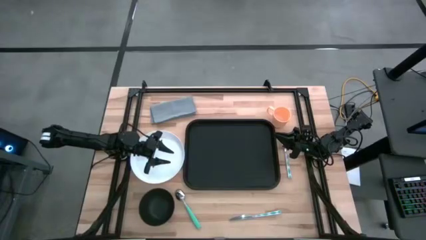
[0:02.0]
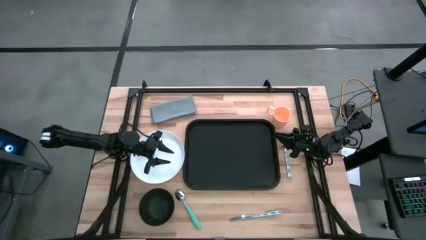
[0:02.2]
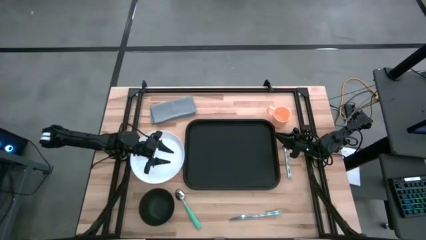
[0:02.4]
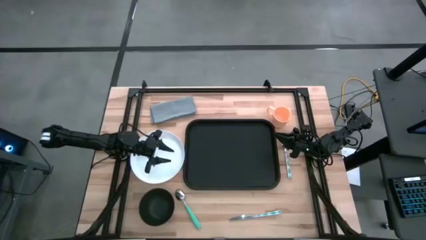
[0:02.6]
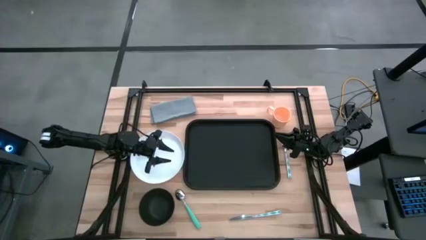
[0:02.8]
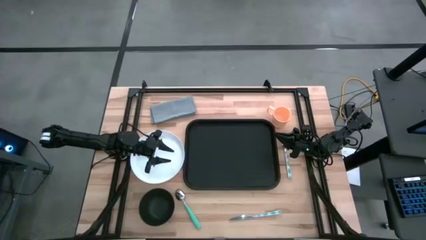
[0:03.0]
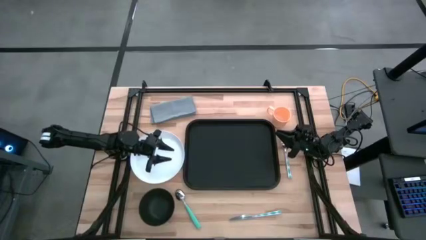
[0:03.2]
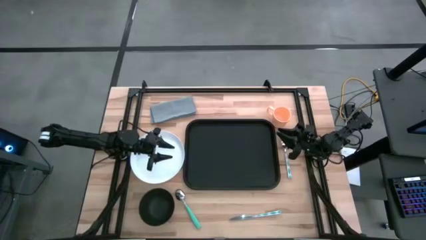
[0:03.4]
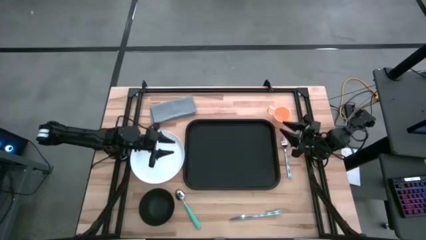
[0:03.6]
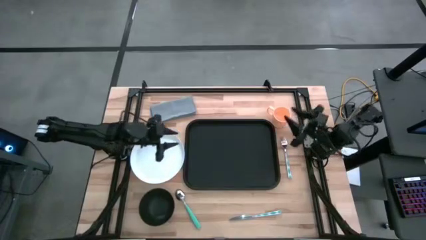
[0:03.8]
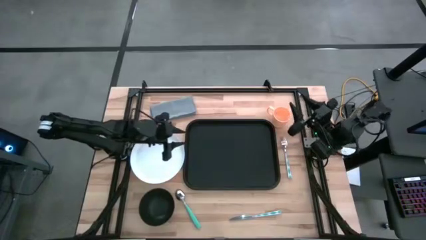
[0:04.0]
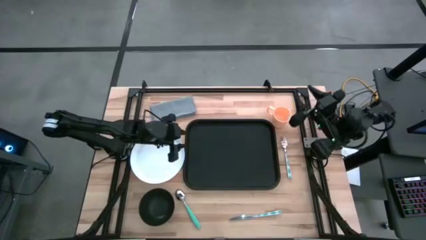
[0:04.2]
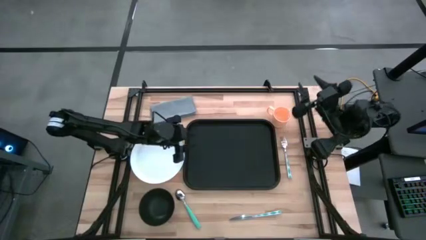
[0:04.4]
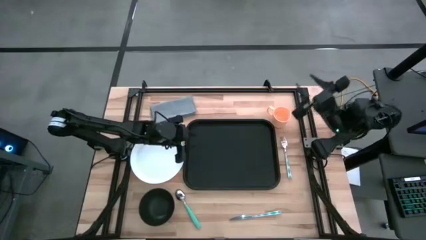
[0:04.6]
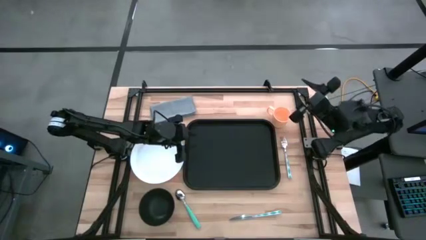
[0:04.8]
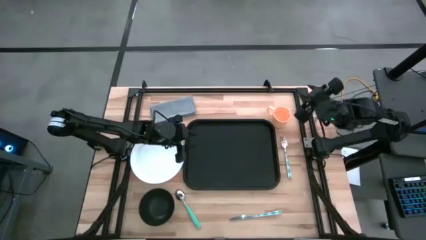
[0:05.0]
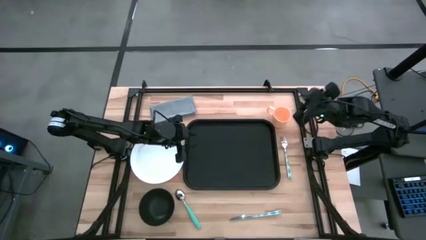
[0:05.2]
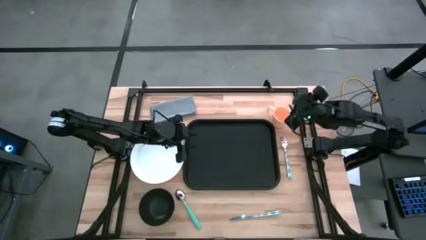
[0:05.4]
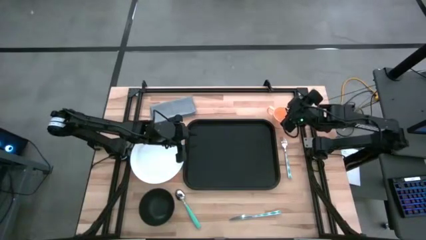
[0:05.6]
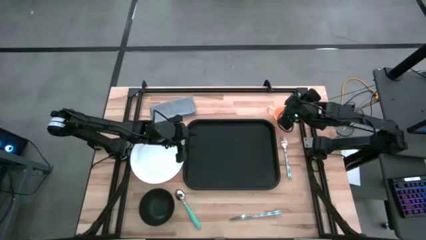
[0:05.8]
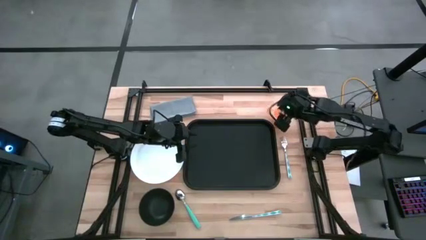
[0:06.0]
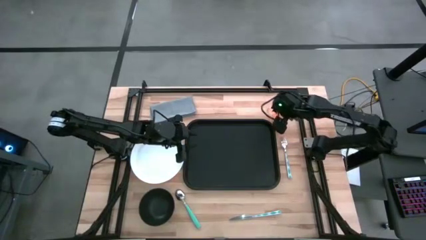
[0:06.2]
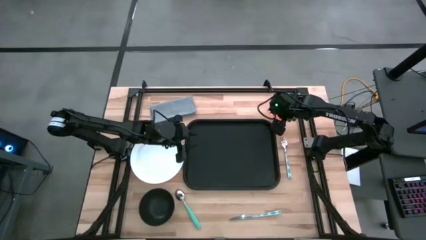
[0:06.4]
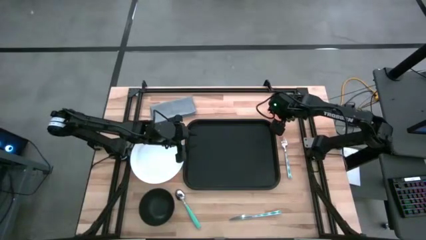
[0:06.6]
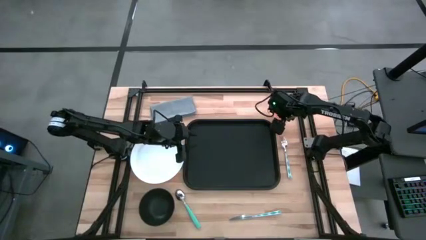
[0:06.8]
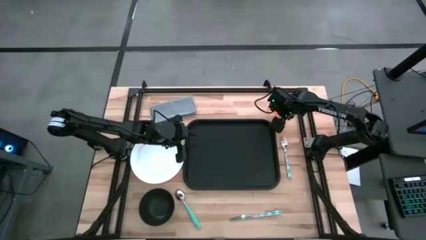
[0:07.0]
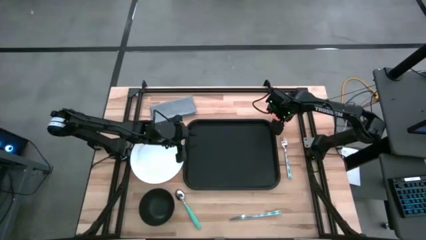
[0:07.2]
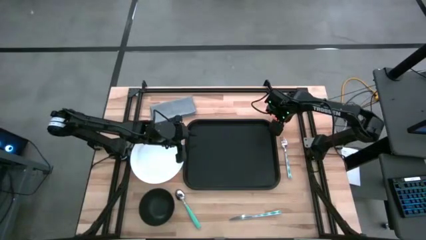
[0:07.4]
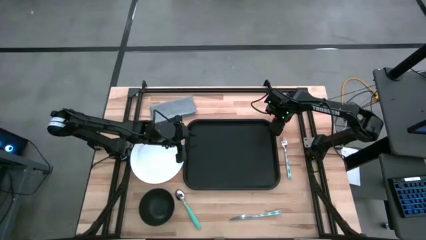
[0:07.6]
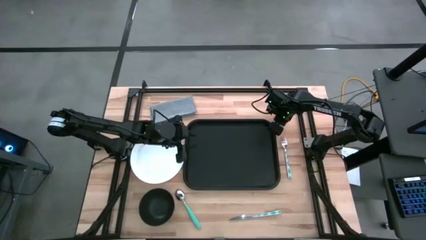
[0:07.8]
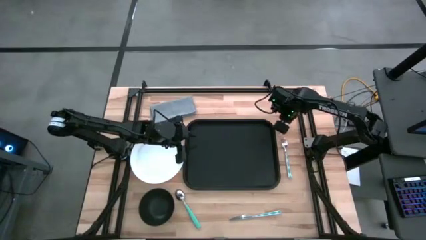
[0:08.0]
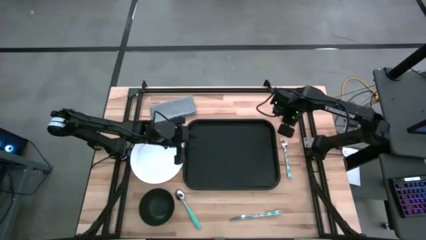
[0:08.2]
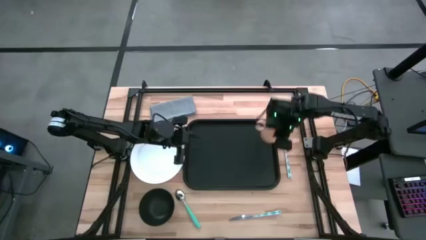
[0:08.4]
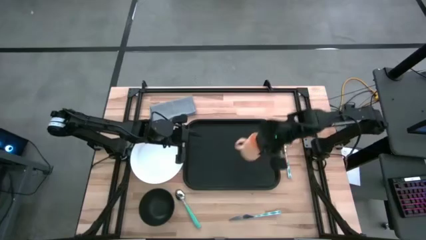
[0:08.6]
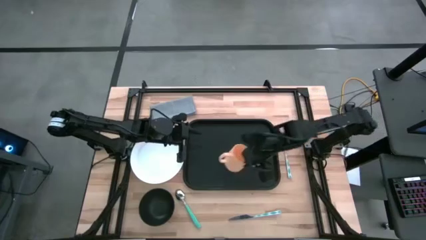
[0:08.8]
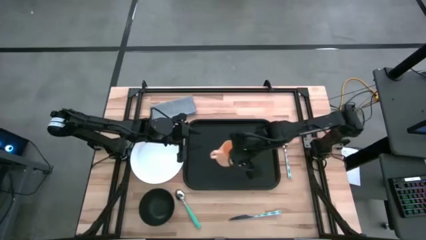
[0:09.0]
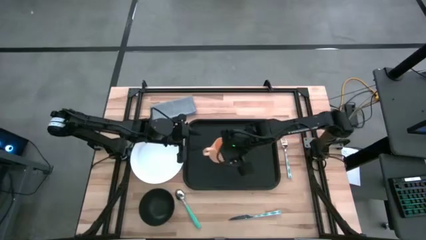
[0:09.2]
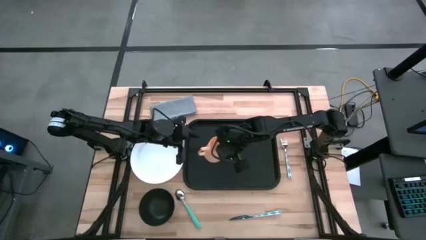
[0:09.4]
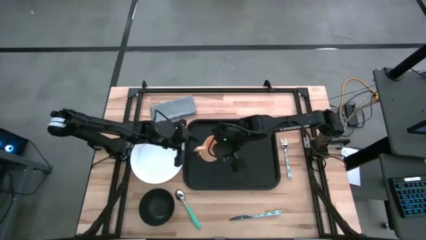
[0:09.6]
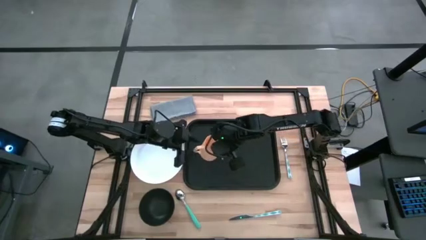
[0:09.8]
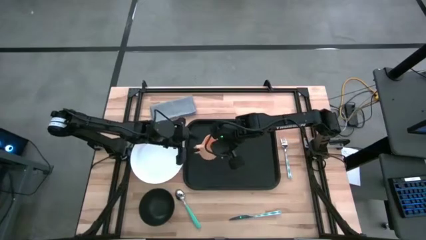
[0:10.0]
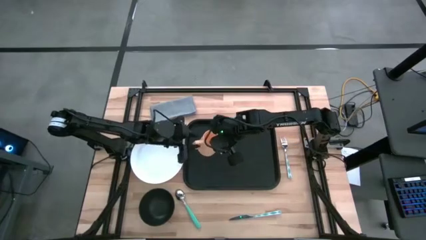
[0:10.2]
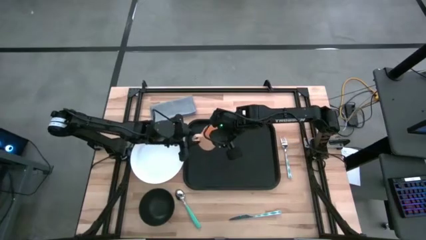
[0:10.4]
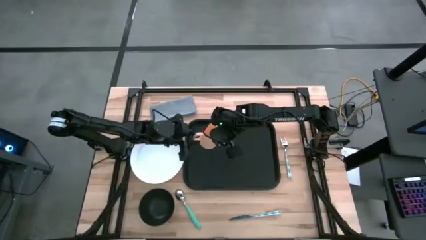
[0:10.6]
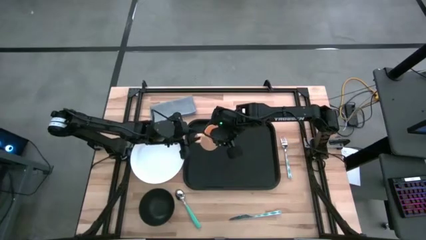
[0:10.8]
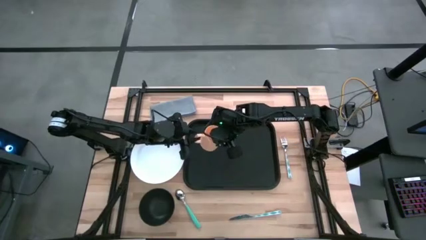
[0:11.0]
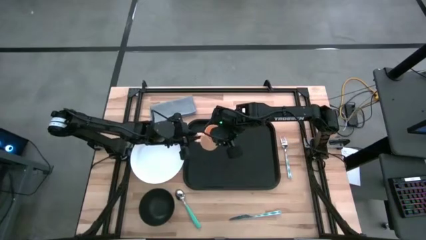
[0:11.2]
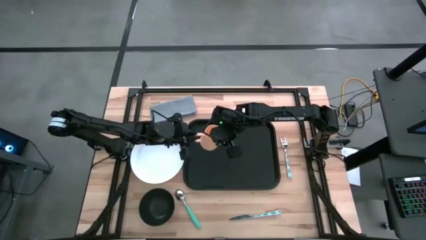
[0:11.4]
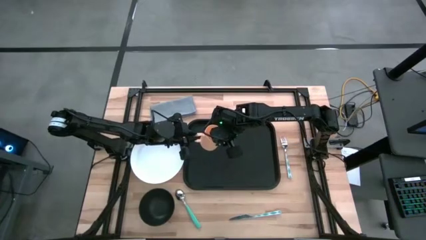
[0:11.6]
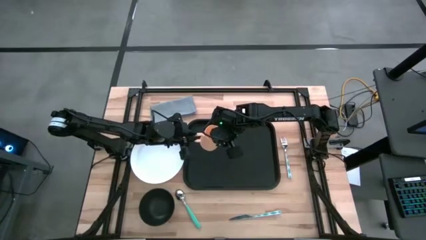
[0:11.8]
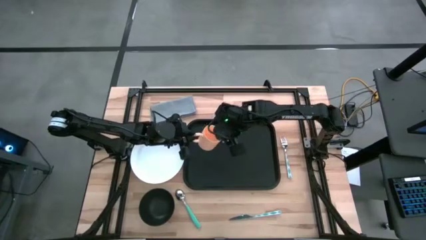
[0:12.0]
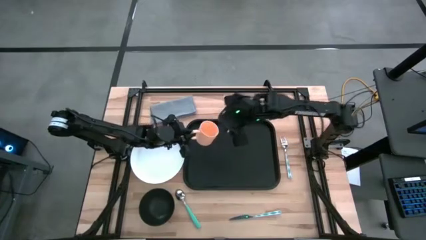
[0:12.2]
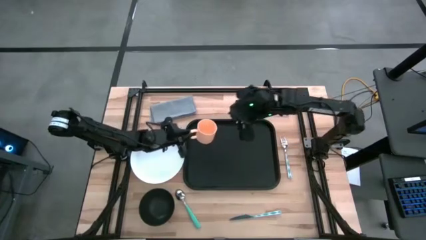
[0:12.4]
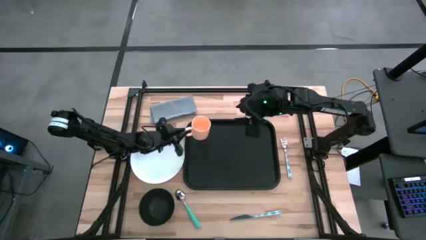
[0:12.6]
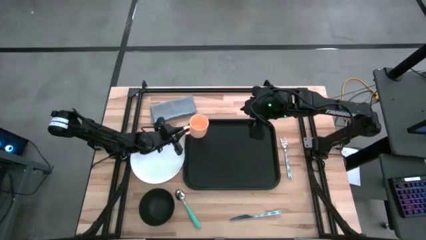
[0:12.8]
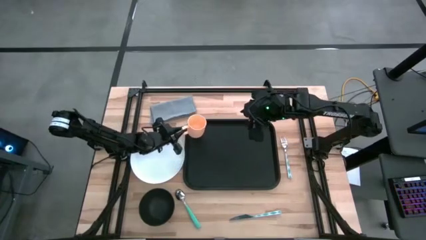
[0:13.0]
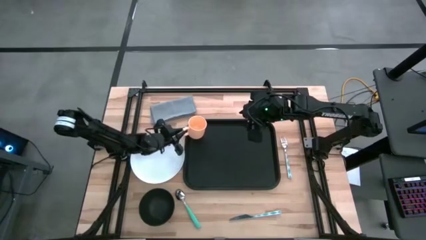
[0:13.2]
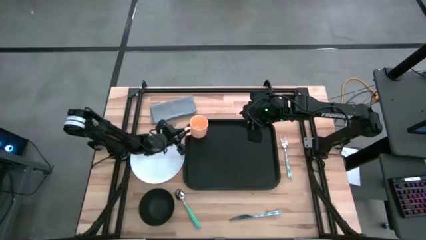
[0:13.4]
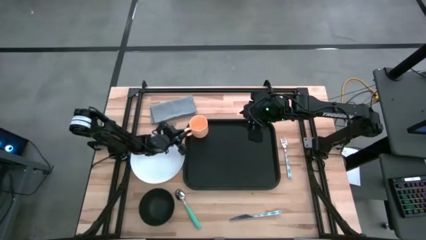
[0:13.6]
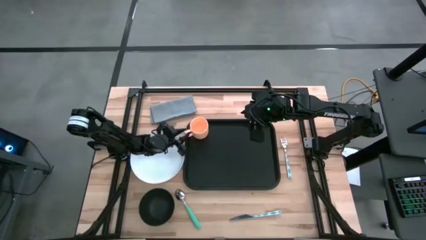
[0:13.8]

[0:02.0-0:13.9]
Task: Set up tray
Put the orange mug on the black tray
